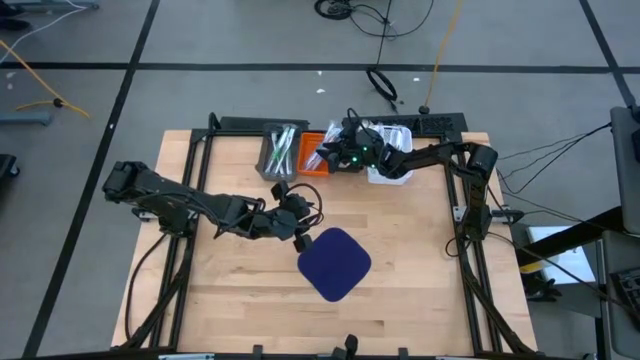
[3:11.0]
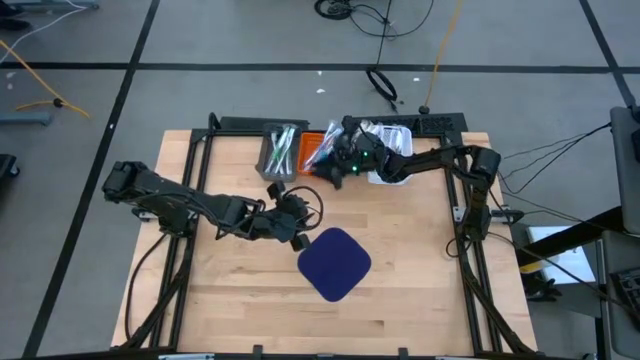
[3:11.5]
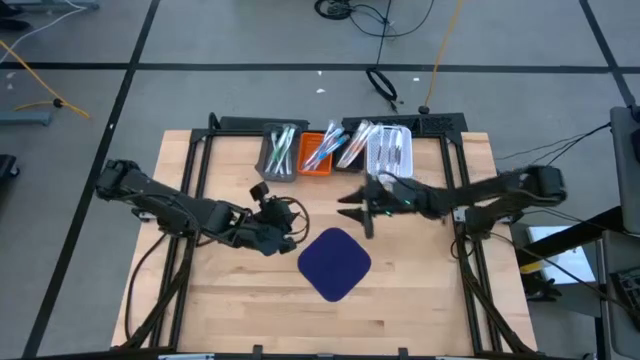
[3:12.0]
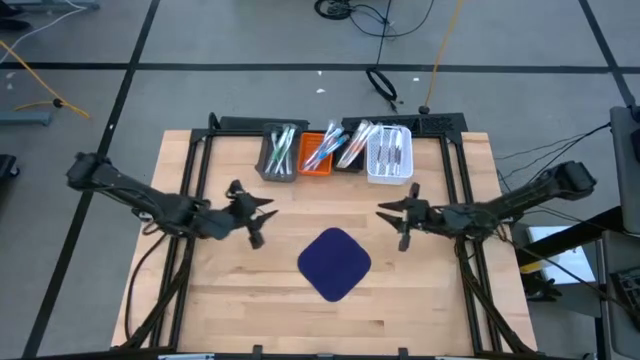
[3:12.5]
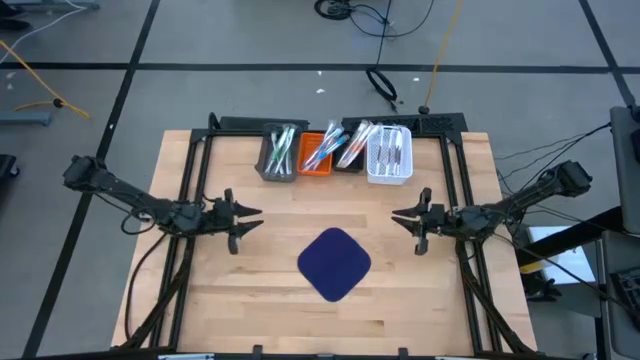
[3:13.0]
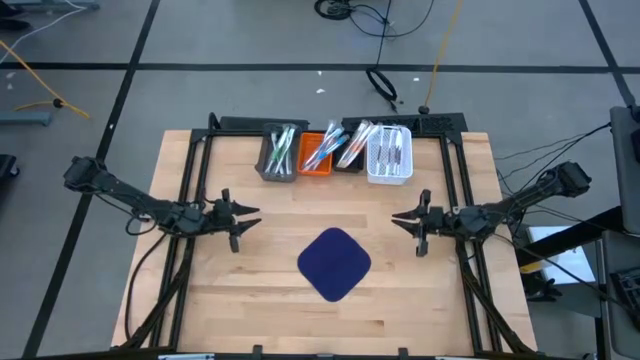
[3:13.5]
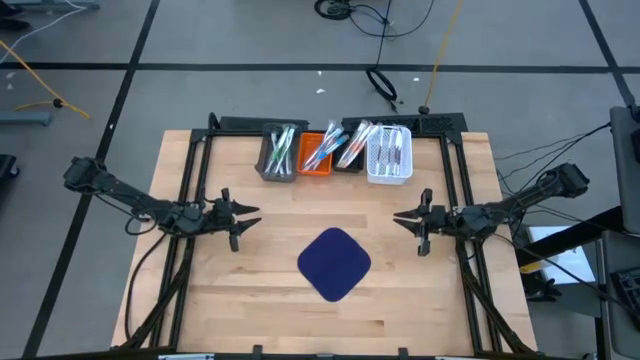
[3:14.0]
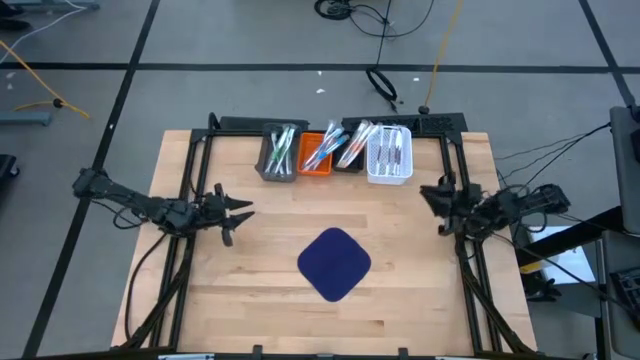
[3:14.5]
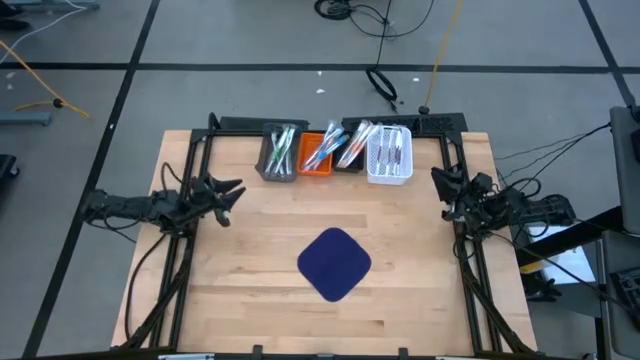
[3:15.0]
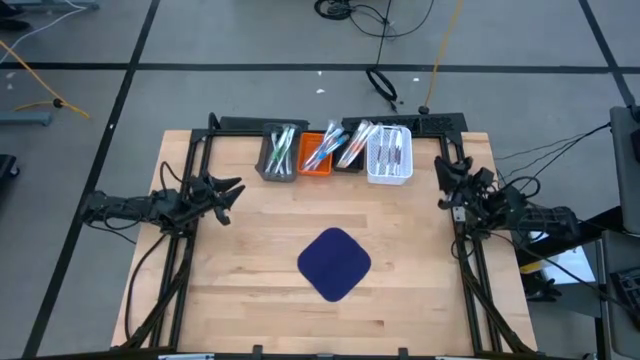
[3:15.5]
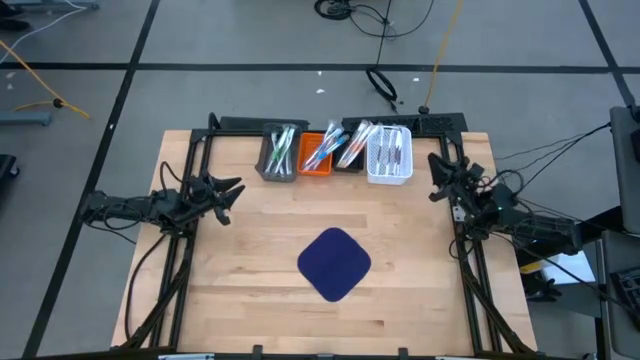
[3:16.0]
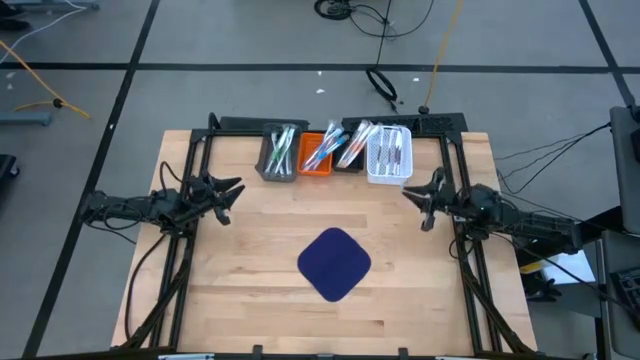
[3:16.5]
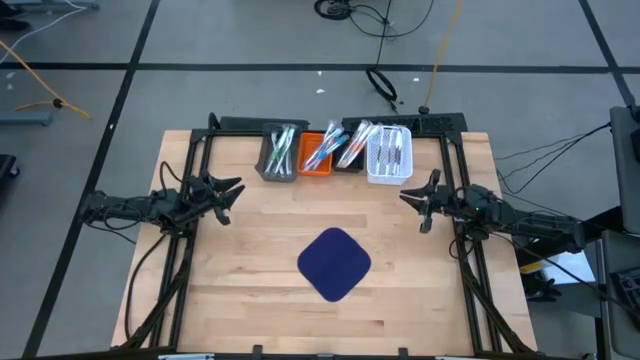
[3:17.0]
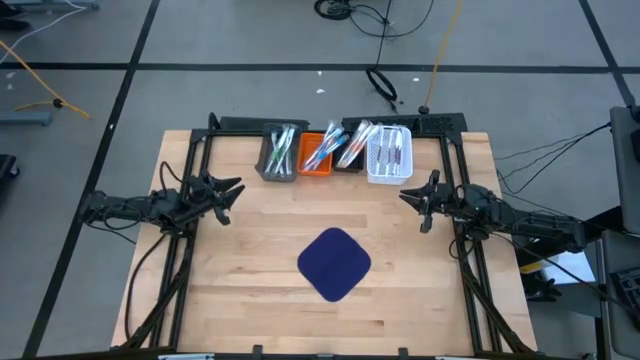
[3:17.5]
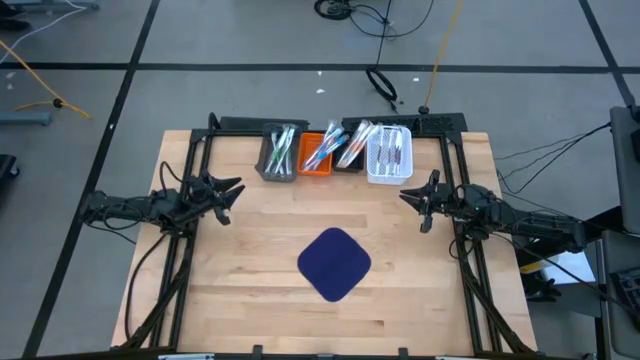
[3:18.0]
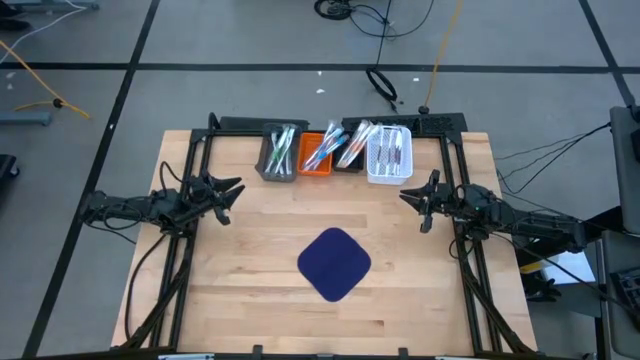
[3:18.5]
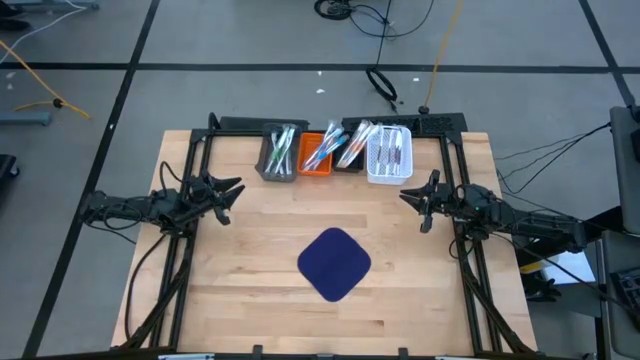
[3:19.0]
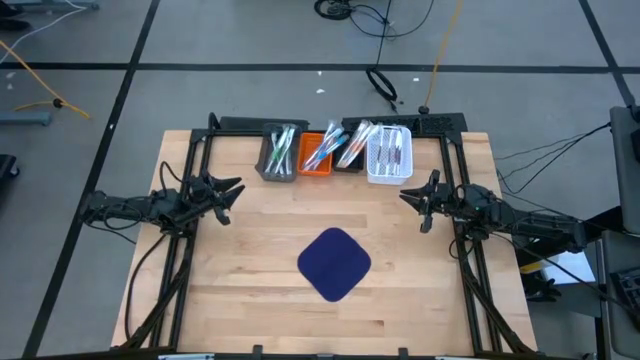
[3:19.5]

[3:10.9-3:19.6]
Task: Pick & Place Toothbrushes
Return to Home Position

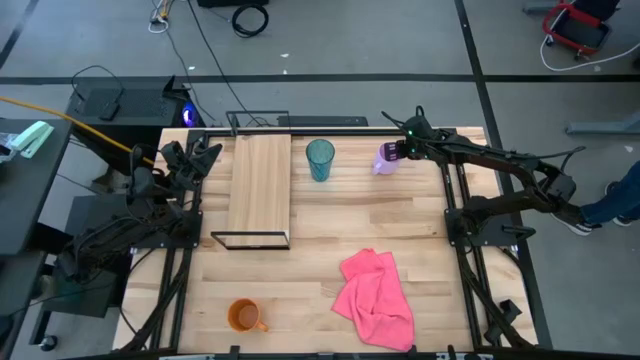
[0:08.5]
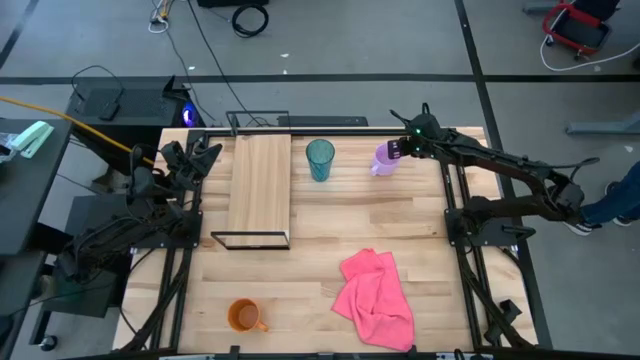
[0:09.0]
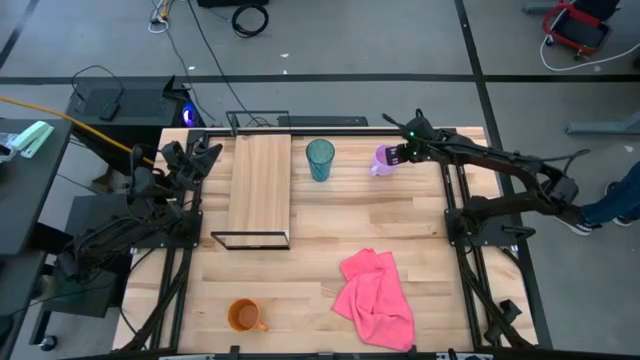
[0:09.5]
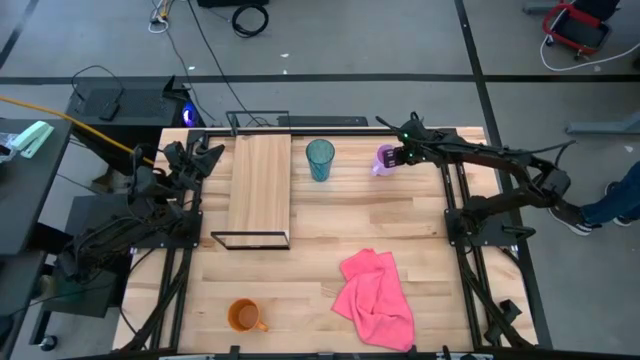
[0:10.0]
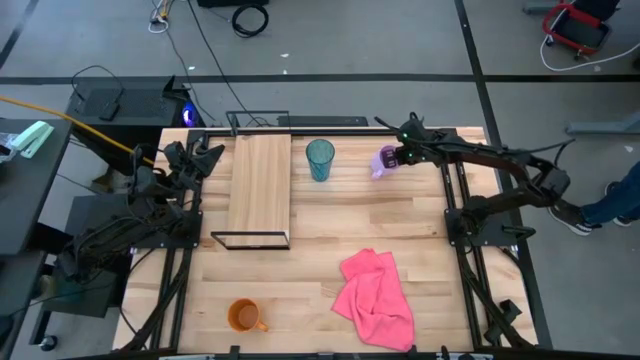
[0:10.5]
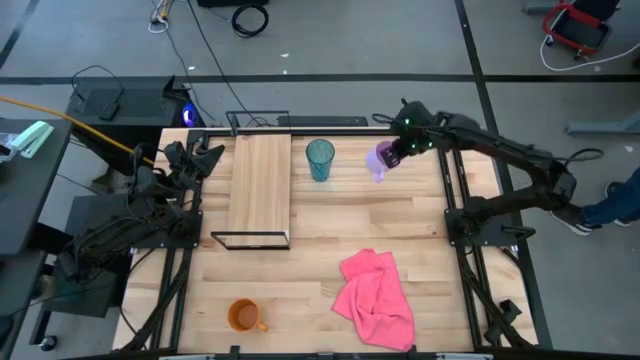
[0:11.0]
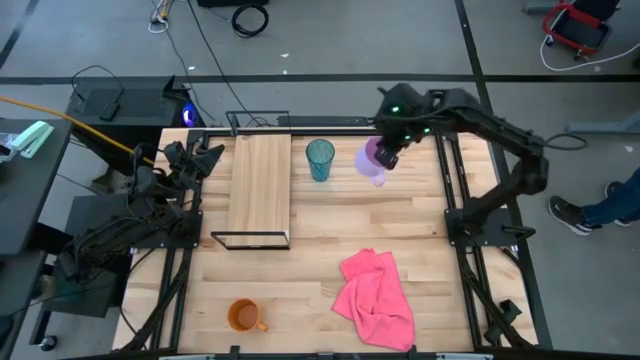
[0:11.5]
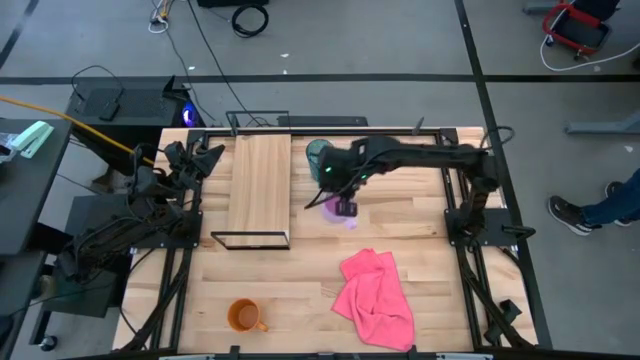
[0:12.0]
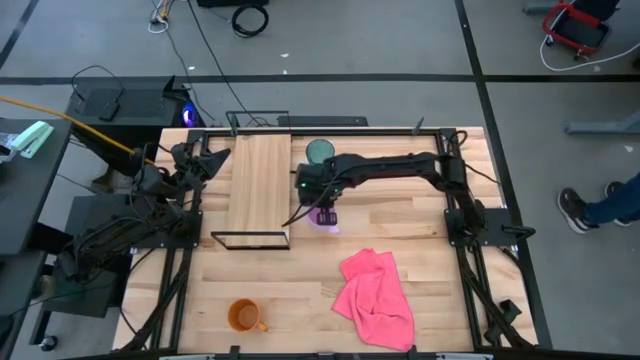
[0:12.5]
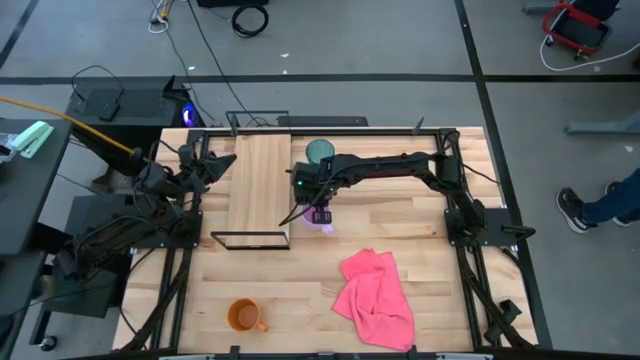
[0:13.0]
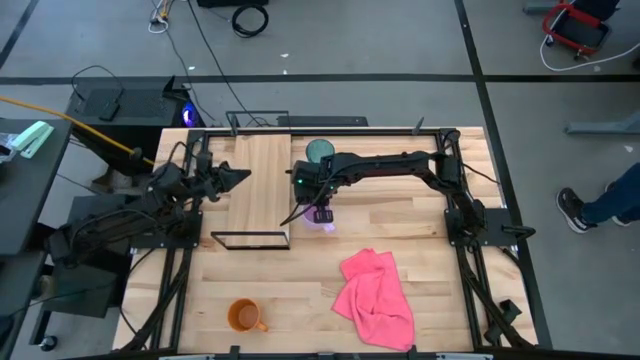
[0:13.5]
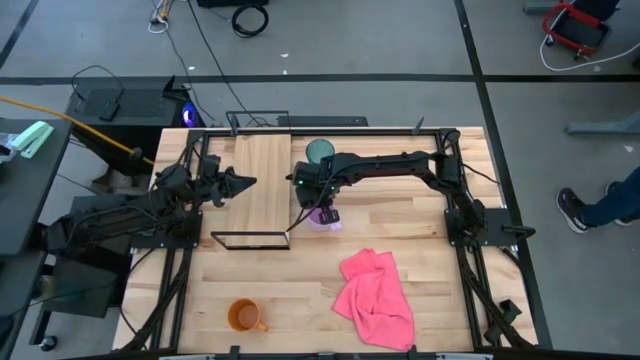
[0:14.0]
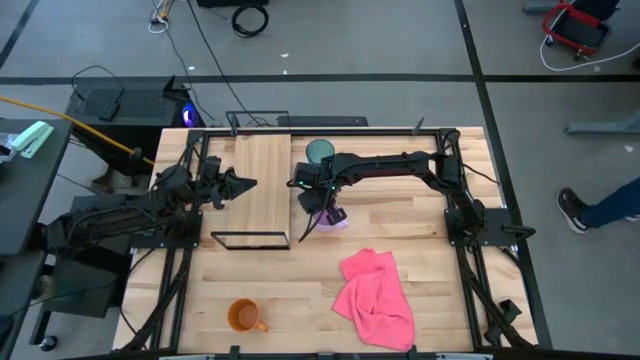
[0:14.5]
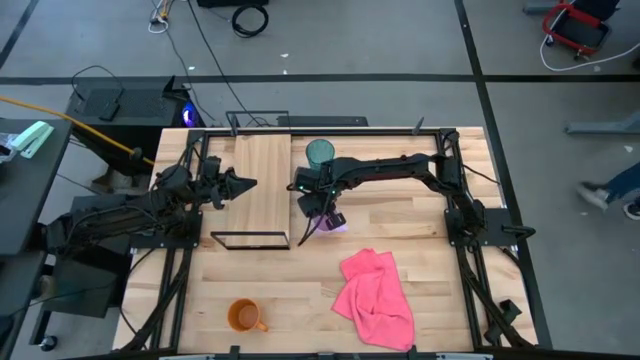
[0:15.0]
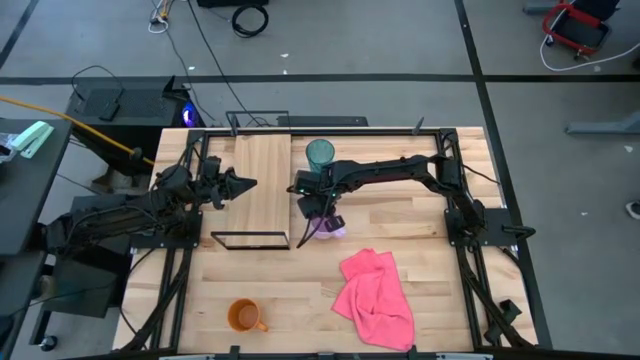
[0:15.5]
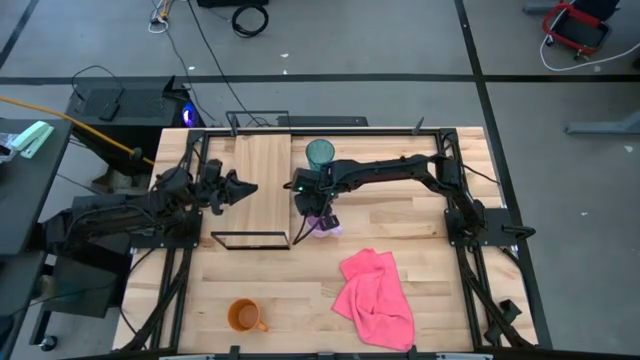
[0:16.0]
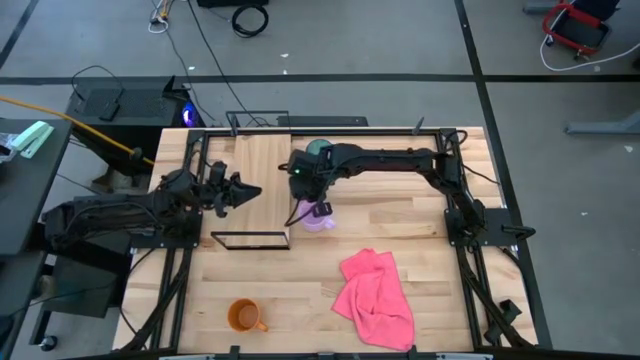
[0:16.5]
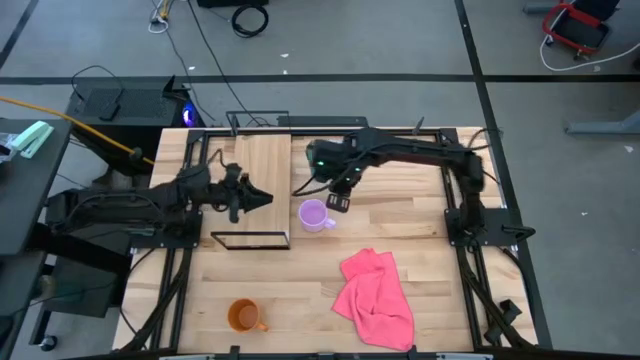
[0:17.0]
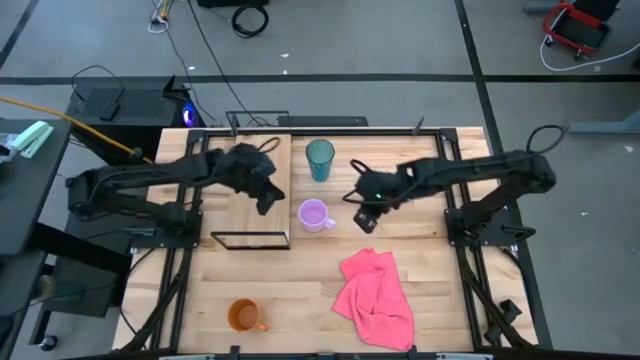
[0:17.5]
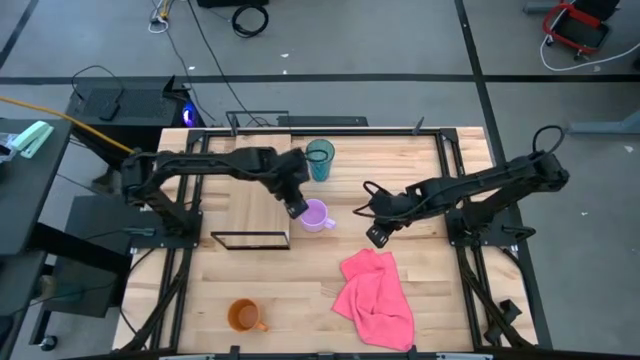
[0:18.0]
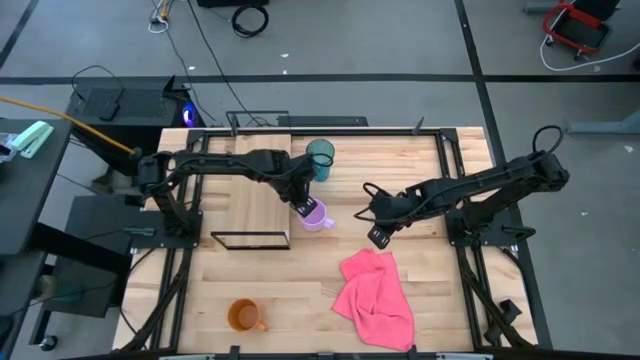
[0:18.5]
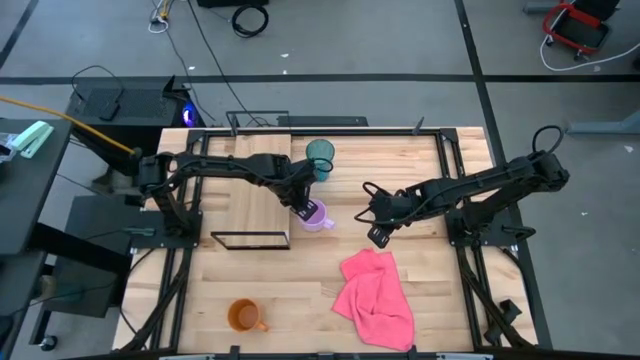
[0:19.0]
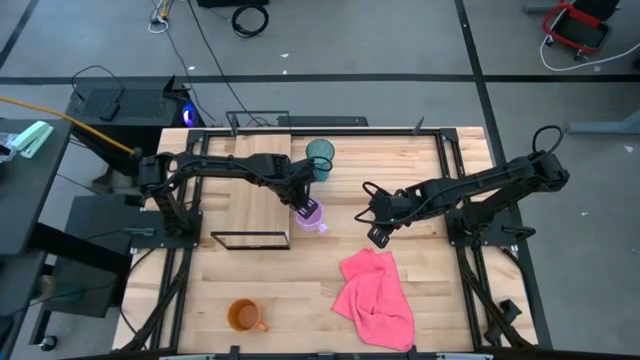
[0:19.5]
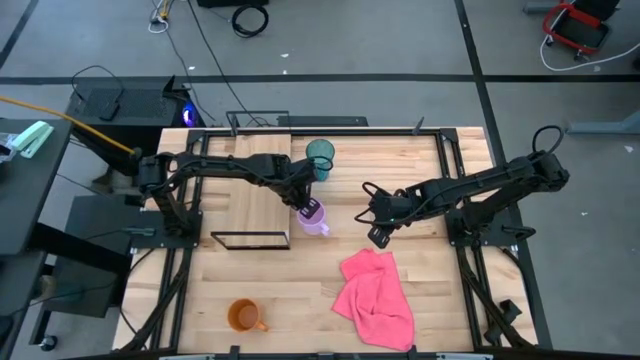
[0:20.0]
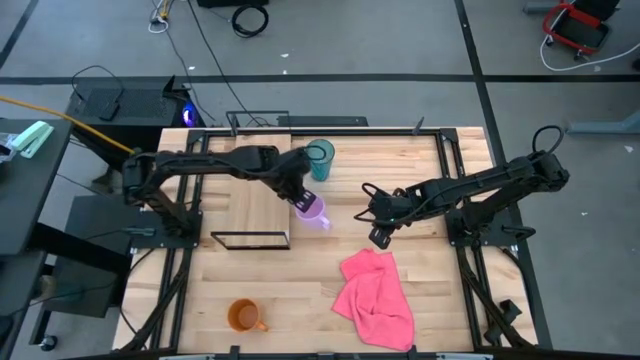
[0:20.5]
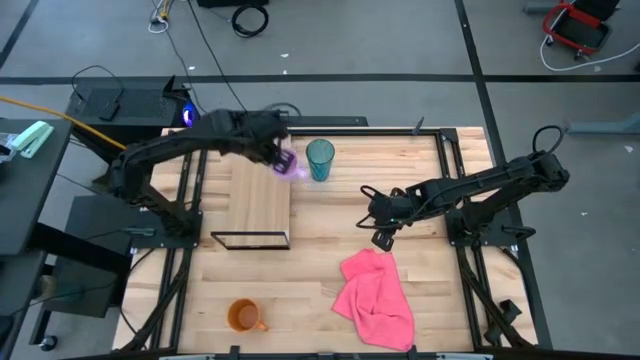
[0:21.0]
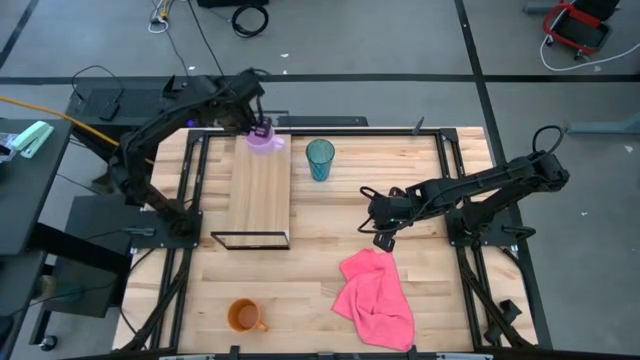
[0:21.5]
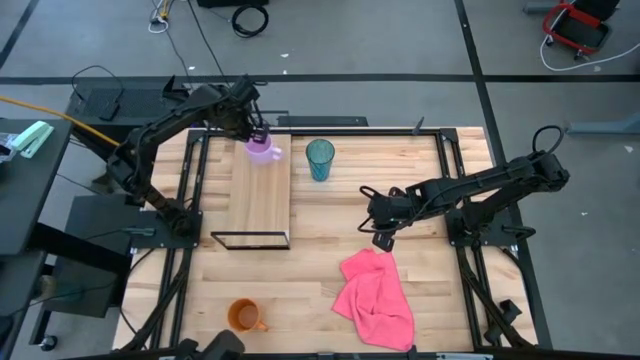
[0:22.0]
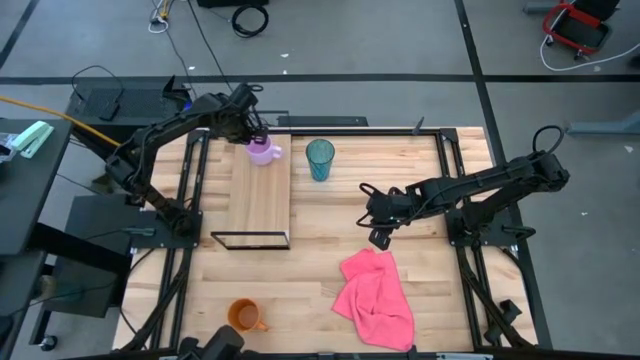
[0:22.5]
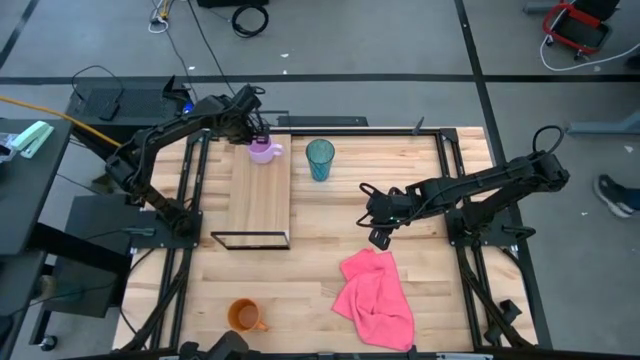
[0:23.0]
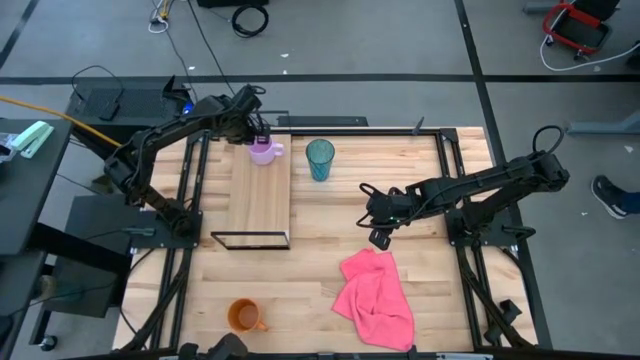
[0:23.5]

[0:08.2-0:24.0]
Task: Stack small to large cups/mugs on shelf
Put the pink mug on the shelf
